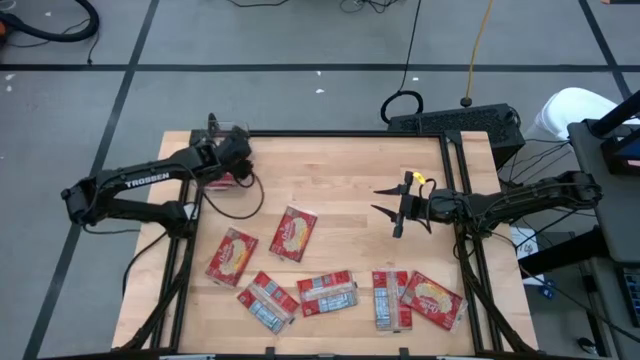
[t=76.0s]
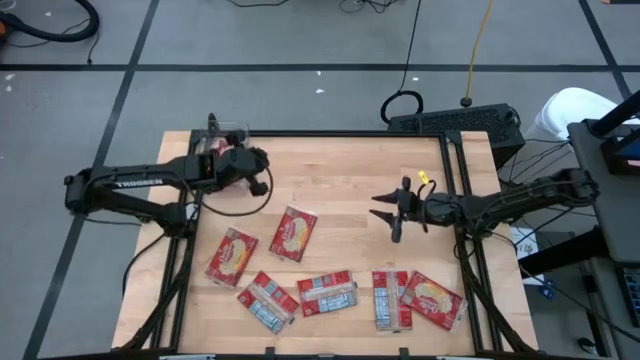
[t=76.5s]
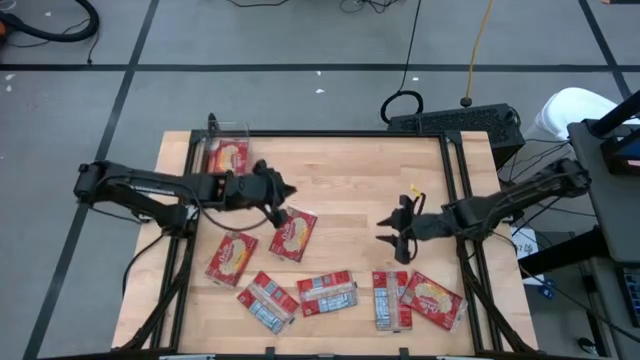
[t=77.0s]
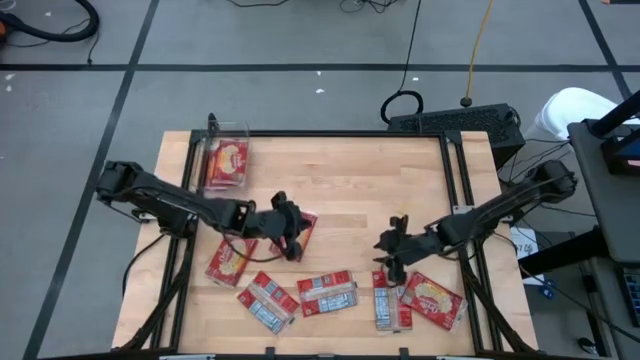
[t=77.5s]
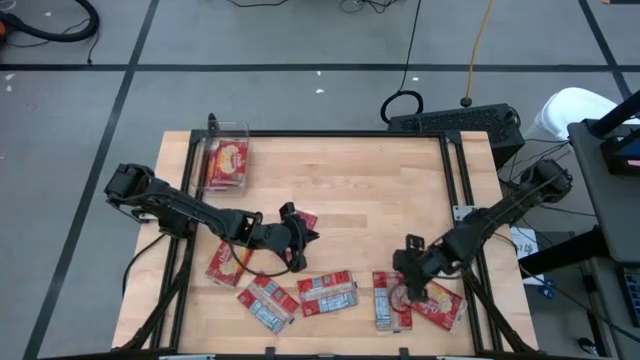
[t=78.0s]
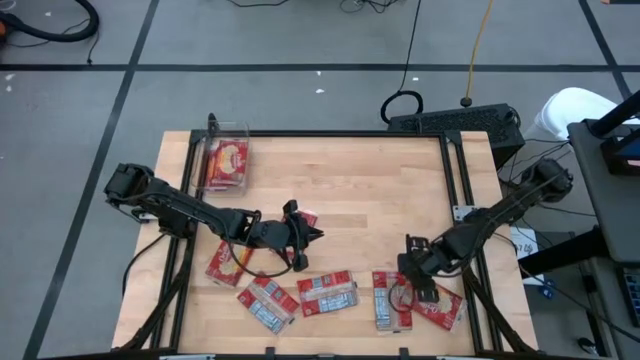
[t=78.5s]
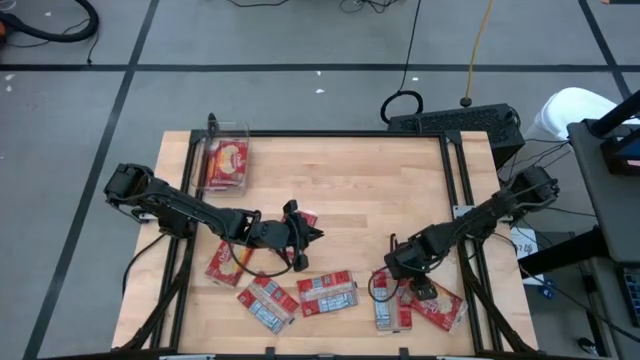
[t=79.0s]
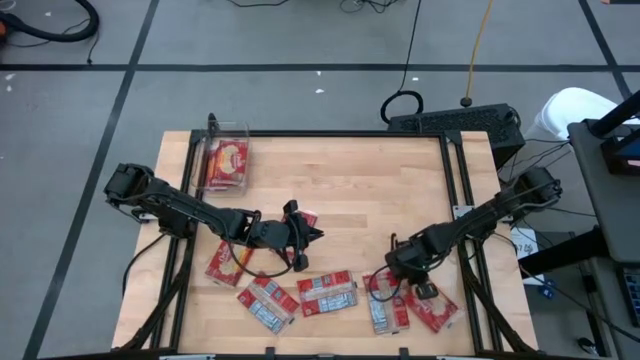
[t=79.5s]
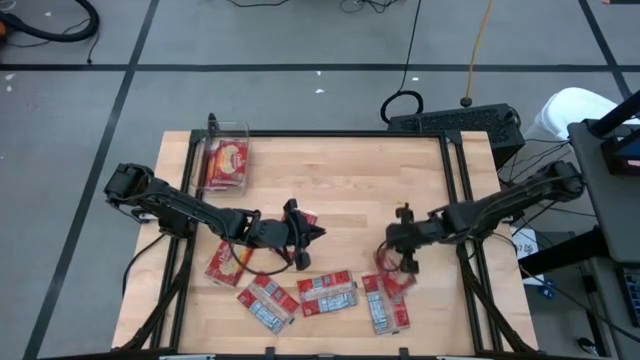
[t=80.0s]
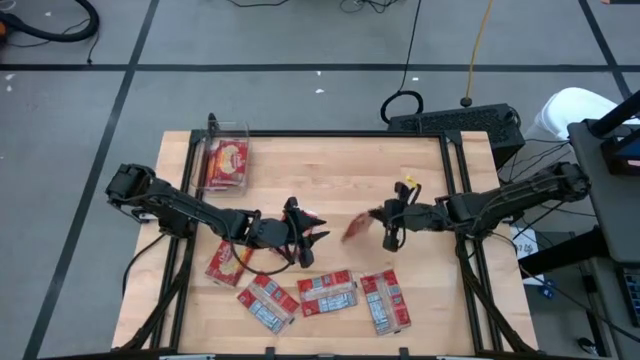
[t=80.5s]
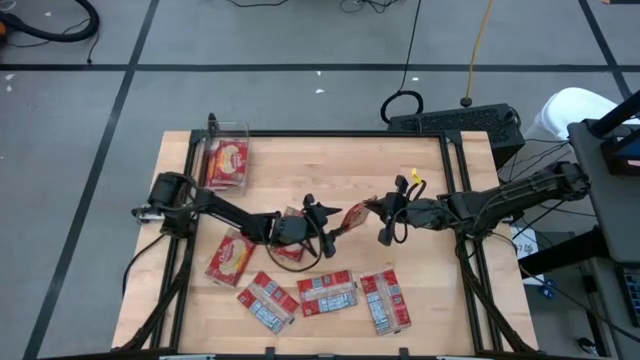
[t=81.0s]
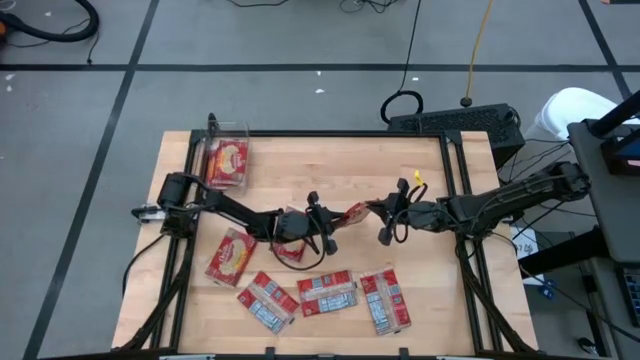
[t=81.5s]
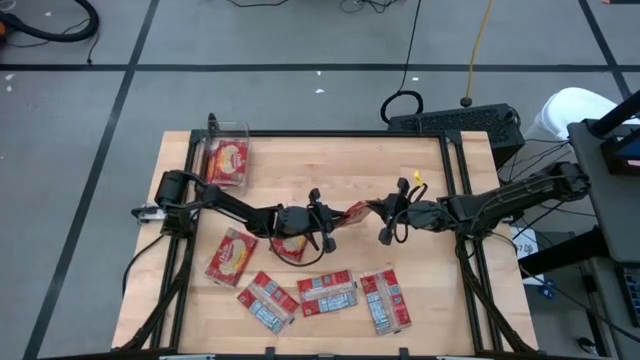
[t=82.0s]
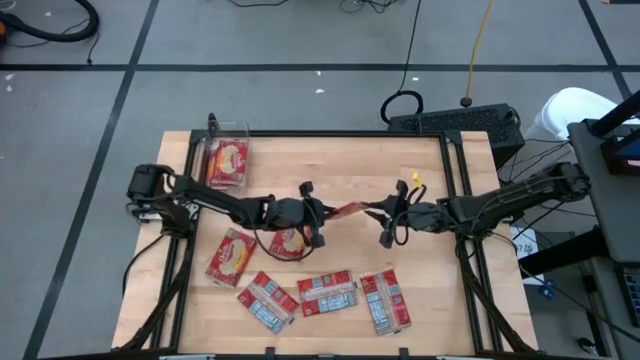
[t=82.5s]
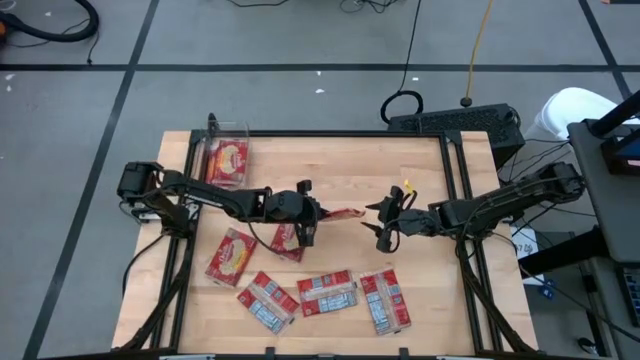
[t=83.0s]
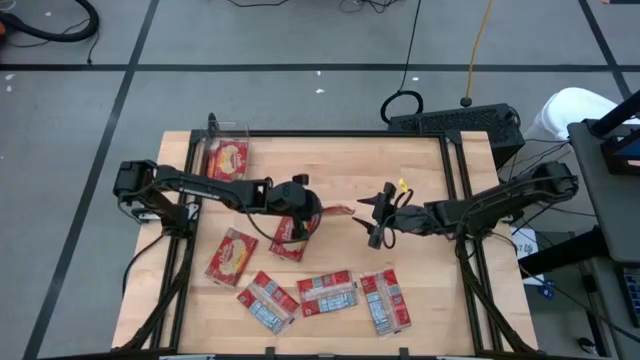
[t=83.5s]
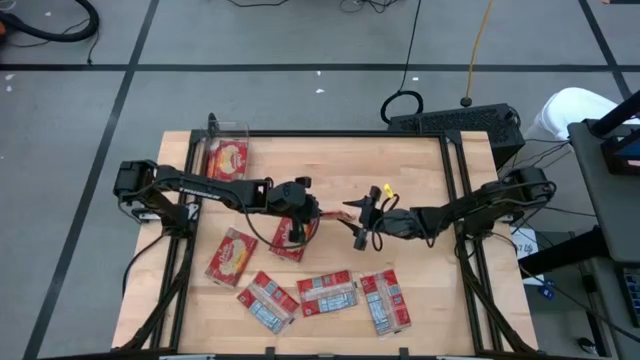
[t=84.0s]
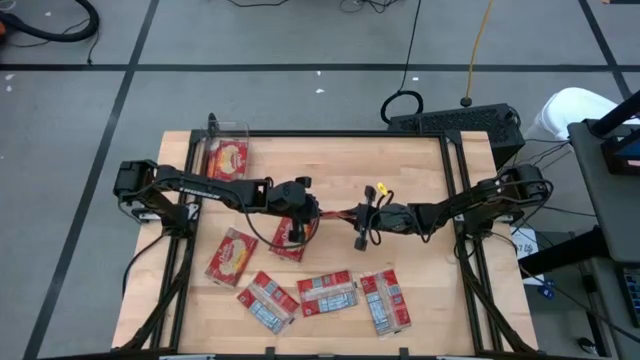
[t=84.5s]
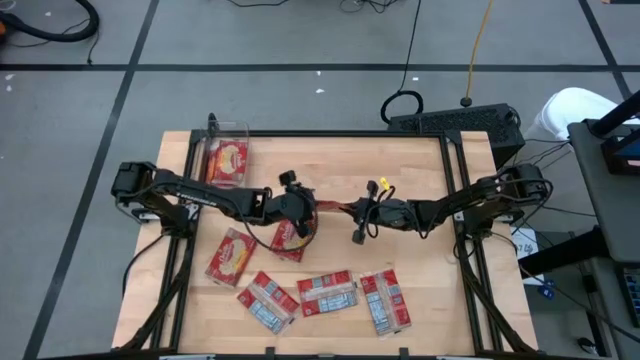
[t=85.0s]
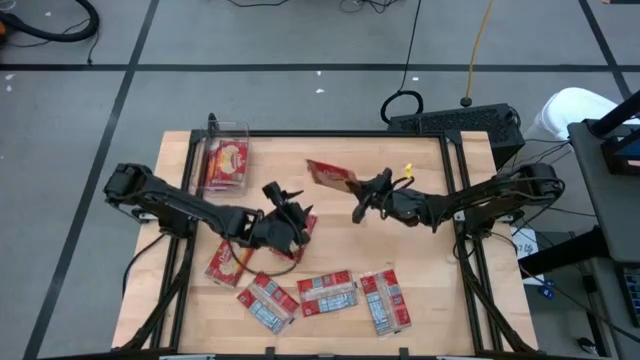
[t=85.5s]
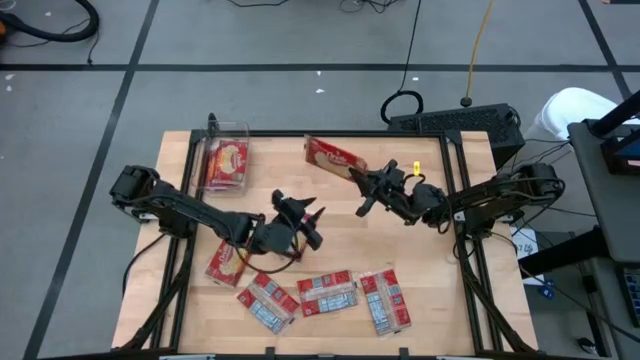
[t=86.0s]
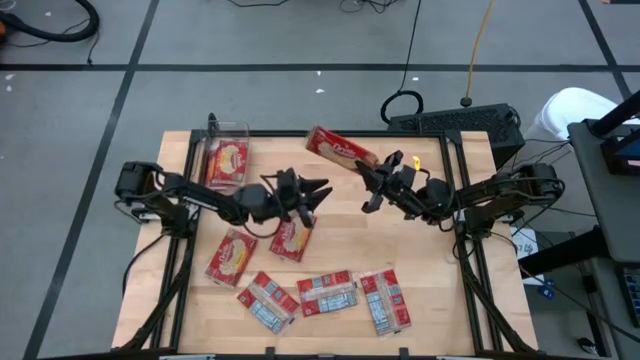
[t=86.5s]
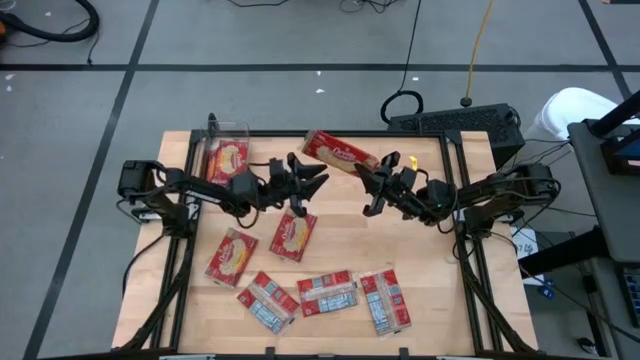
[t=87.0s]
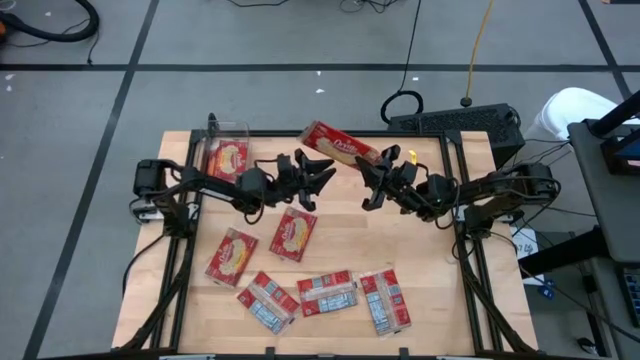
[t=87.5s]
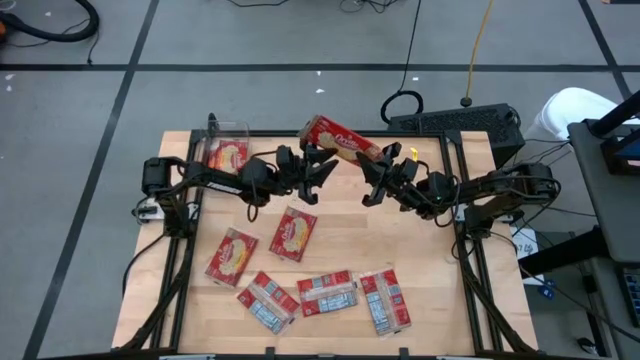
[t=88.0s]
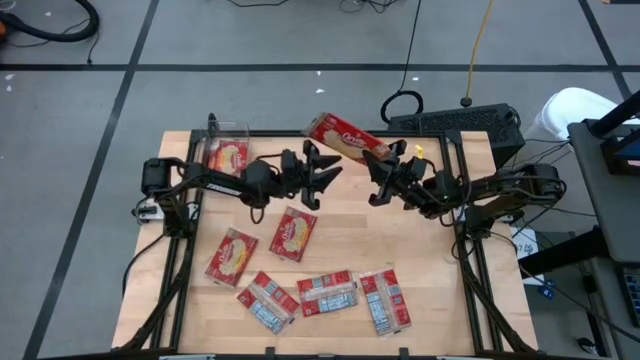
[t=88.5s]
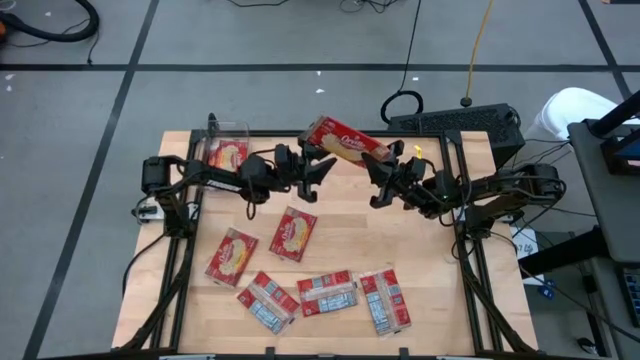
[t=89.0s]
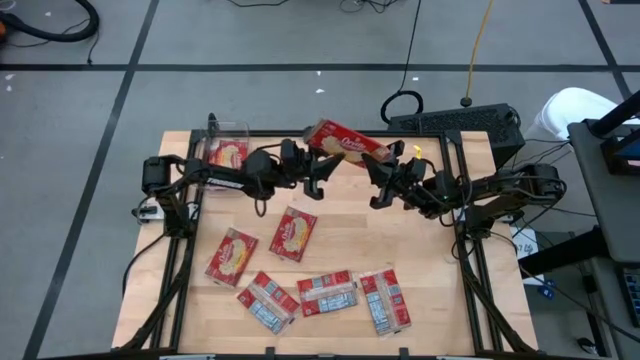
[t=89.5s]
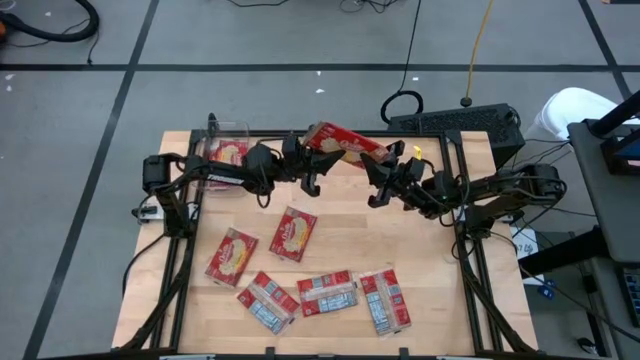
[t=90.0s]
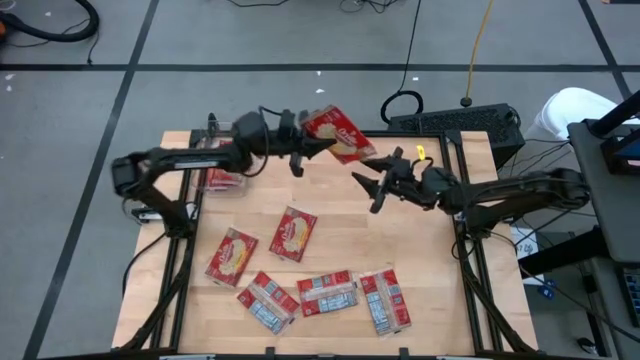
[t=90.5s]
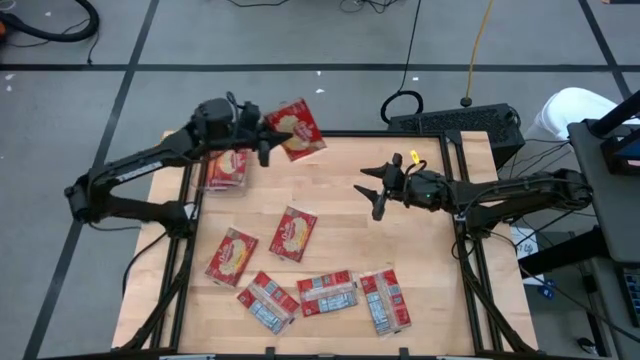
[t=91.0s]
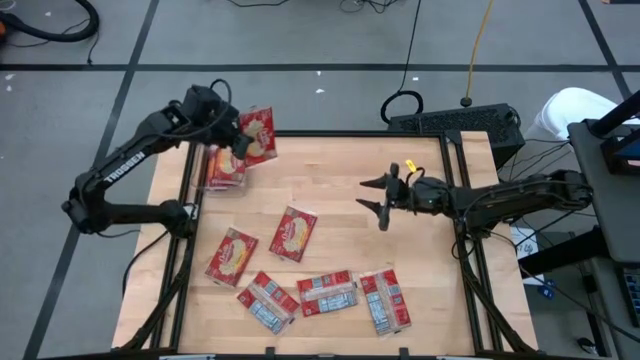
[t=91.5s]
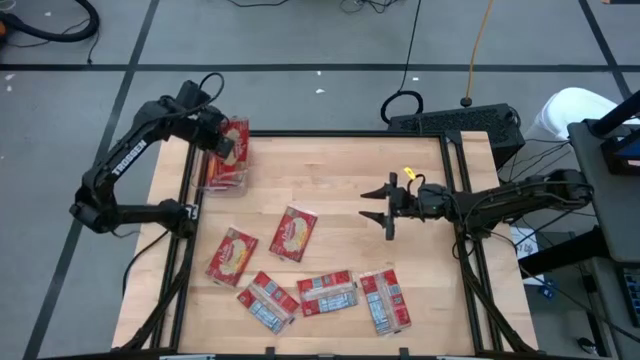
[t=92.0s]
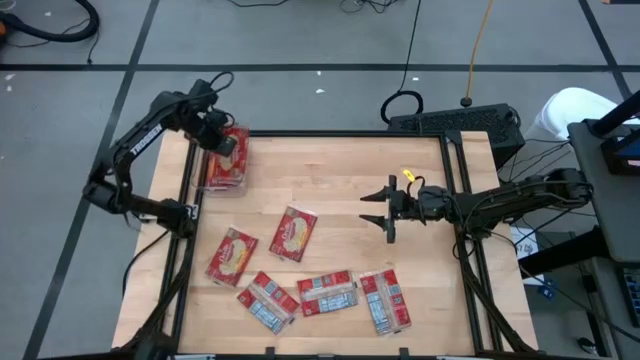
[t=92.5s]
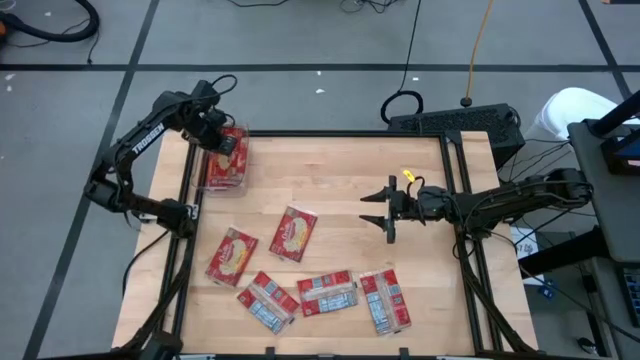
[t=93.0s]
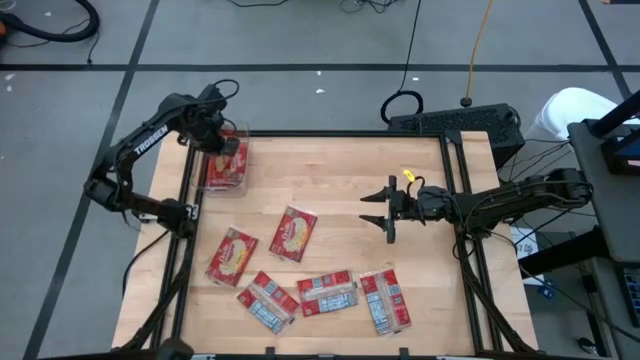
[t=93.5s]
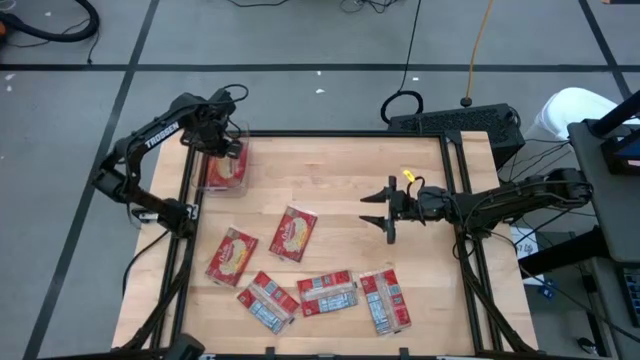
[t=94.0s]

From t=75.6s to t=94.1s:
Task: Sort popcorn bags into baskets
Put the red popcorn bag into the transparent bin

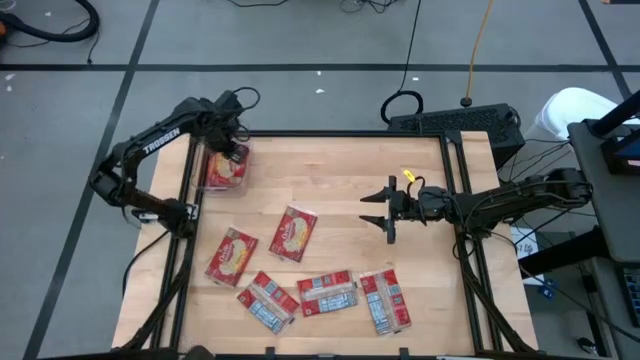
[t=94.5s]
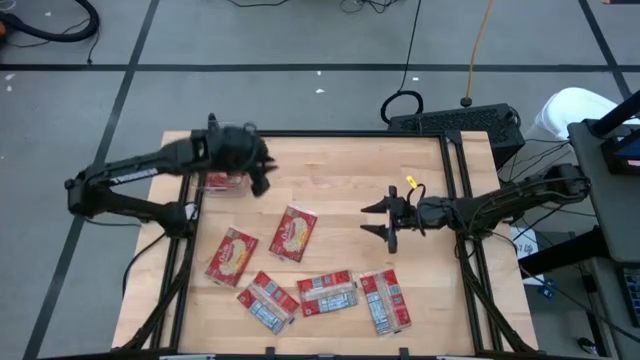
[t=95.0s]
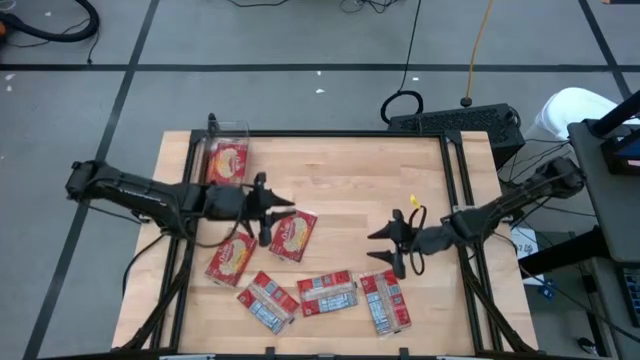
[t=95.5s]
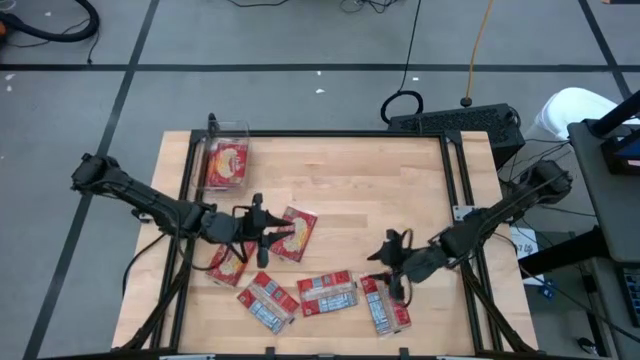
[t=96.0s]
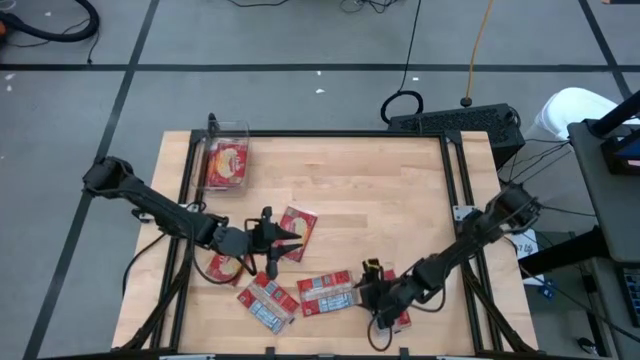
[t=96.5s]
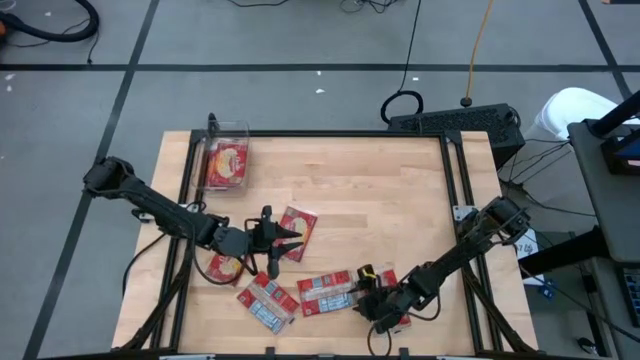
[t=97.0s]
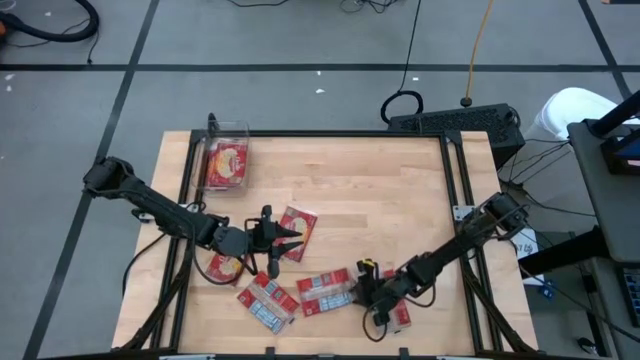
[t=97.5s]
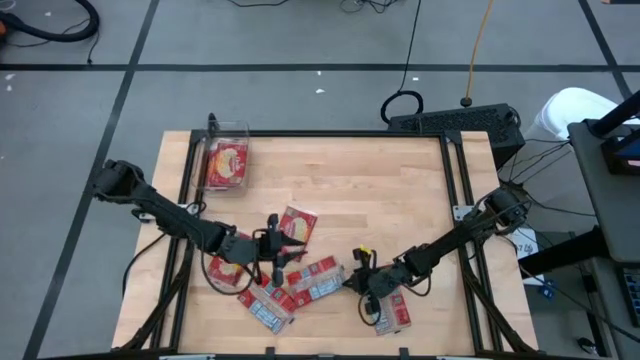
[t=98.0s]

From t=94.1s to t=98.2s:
Put the red popcorn bag into the transparent bin
